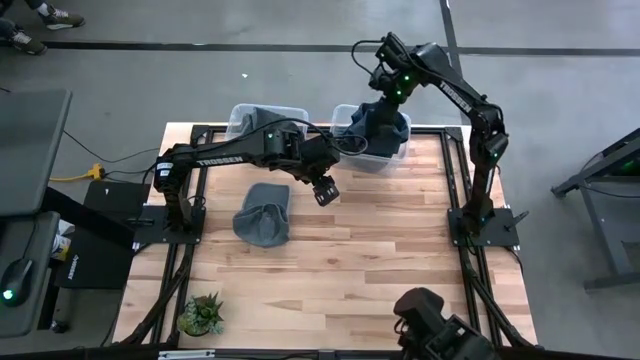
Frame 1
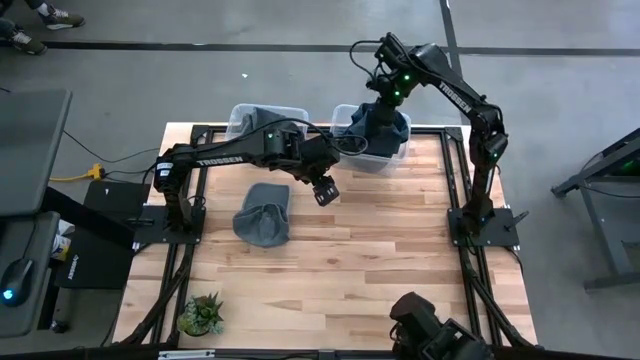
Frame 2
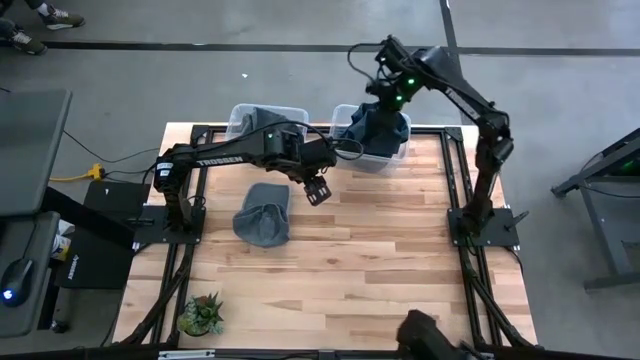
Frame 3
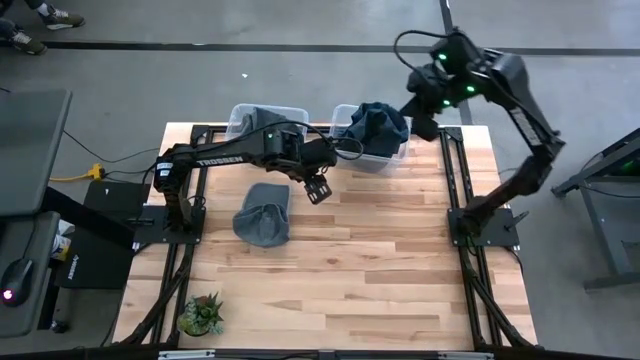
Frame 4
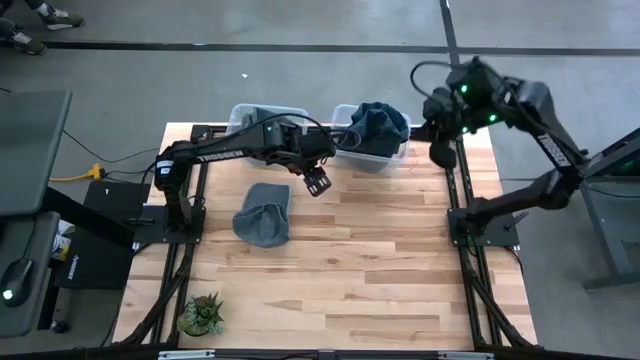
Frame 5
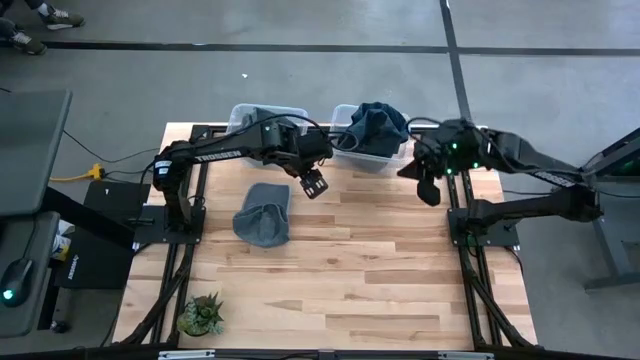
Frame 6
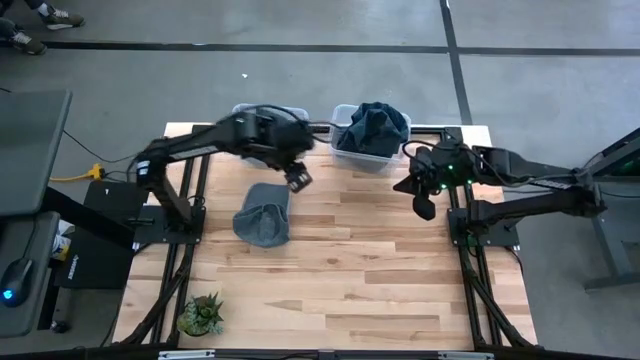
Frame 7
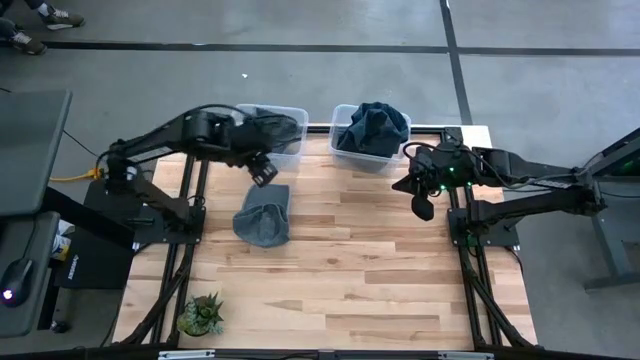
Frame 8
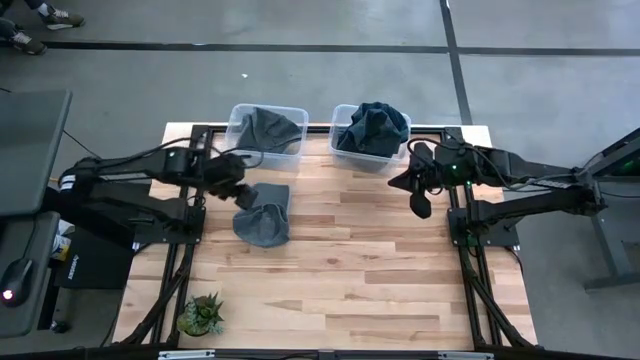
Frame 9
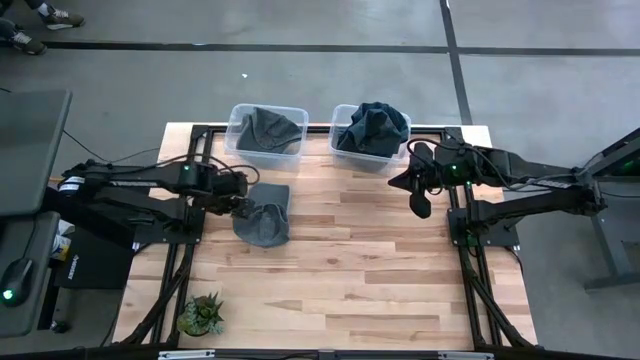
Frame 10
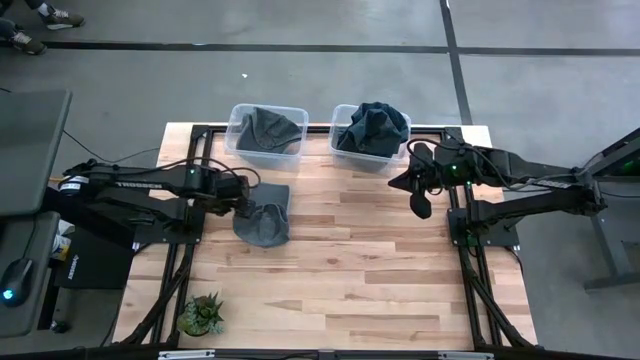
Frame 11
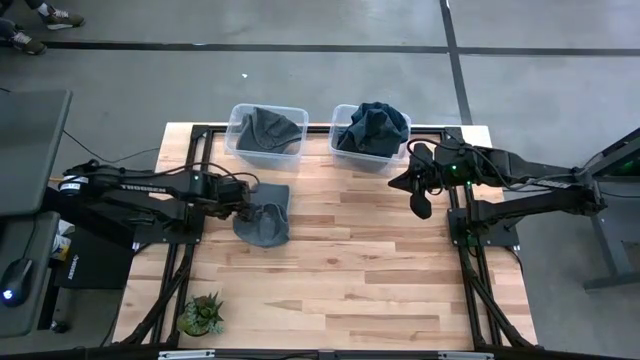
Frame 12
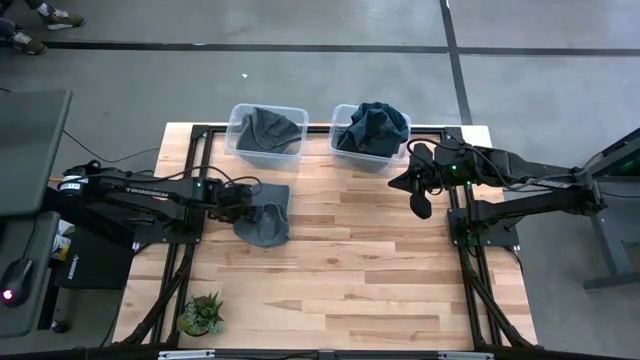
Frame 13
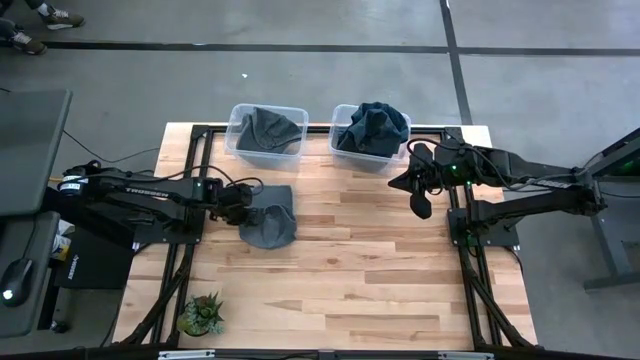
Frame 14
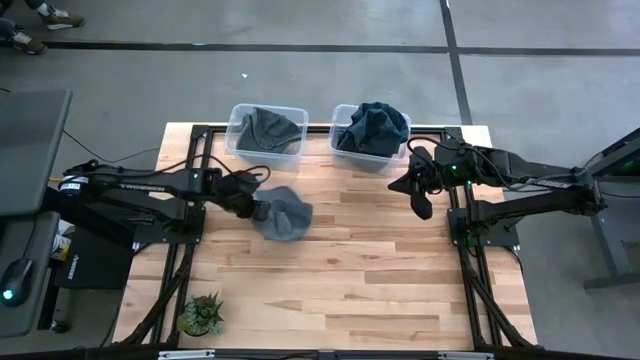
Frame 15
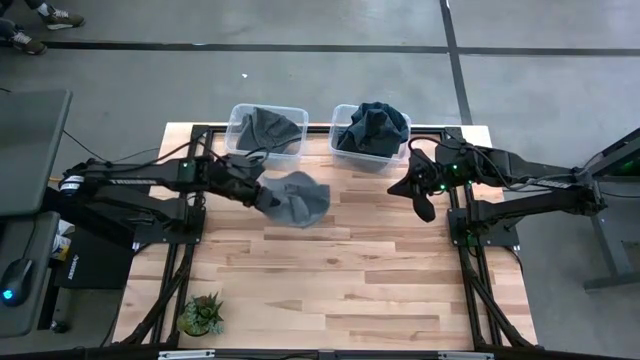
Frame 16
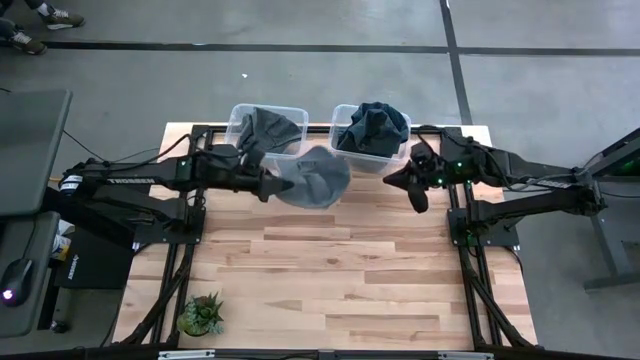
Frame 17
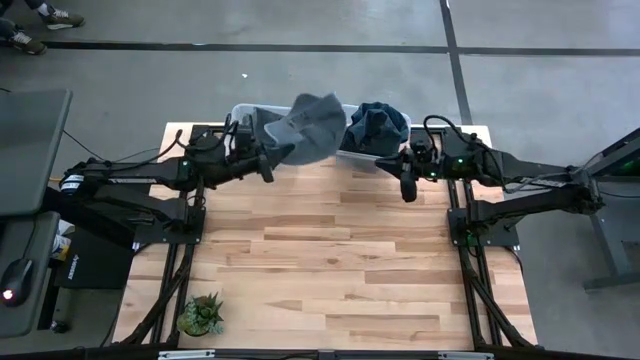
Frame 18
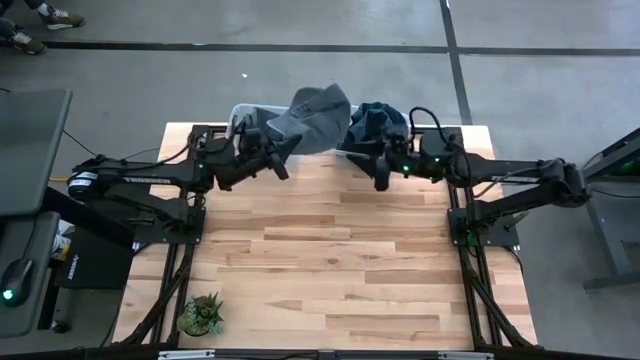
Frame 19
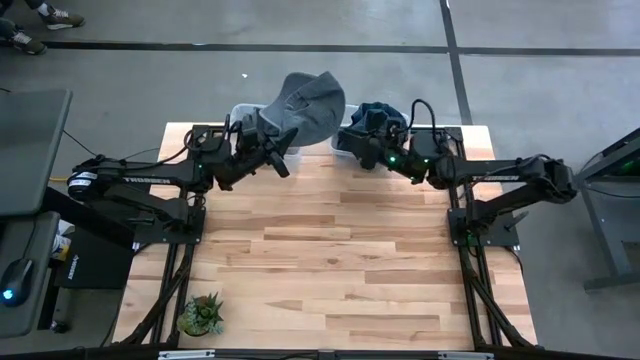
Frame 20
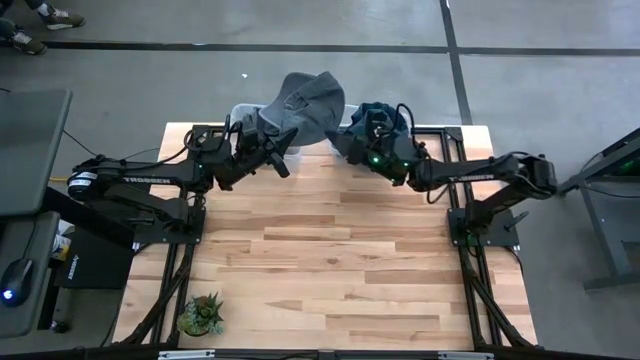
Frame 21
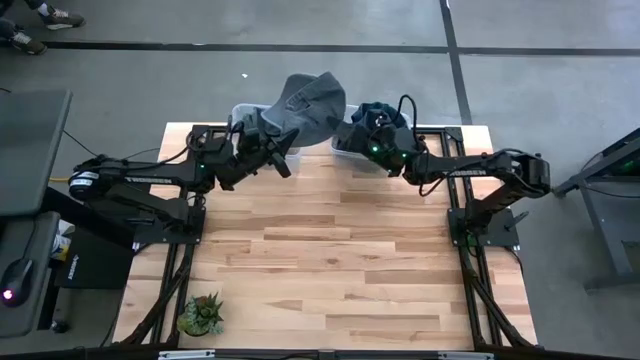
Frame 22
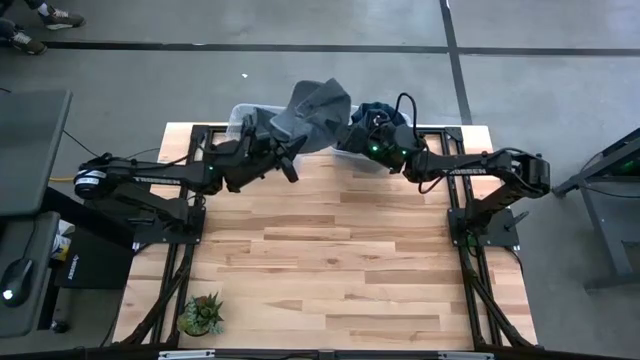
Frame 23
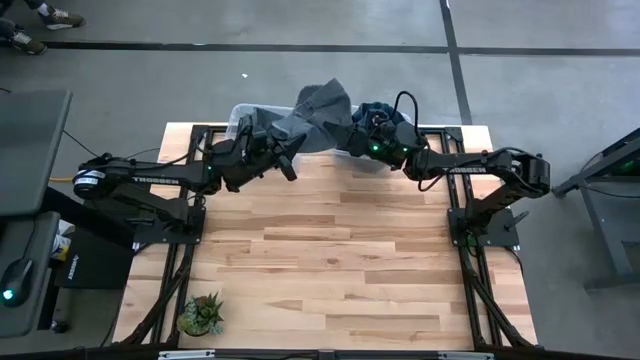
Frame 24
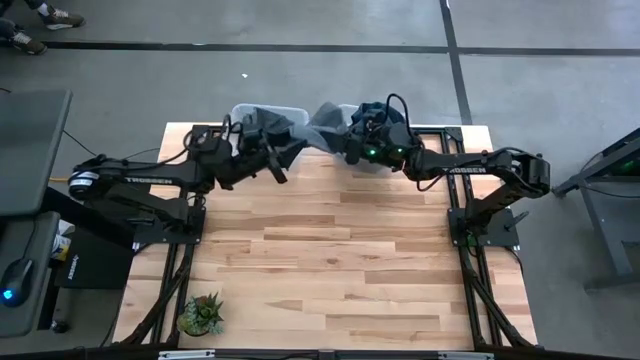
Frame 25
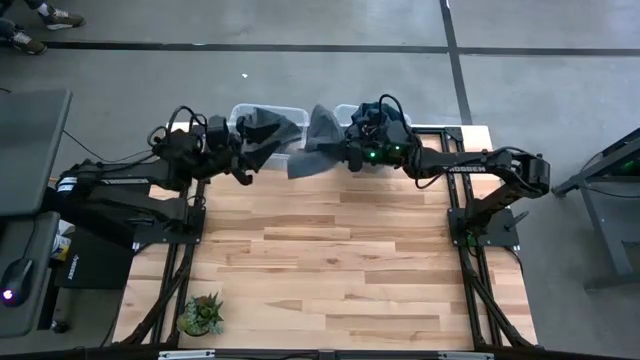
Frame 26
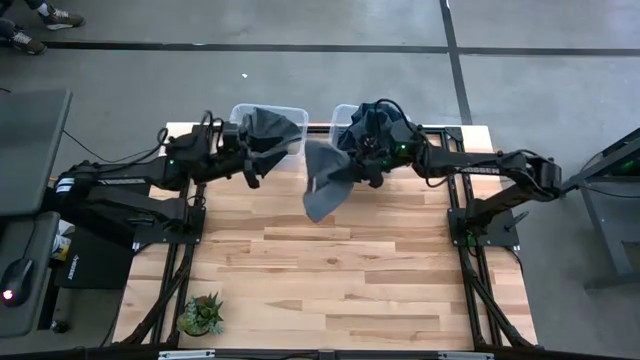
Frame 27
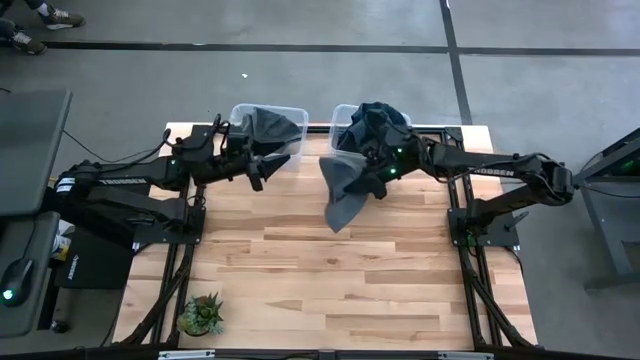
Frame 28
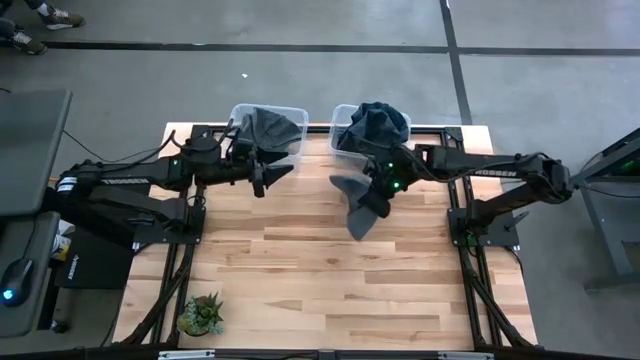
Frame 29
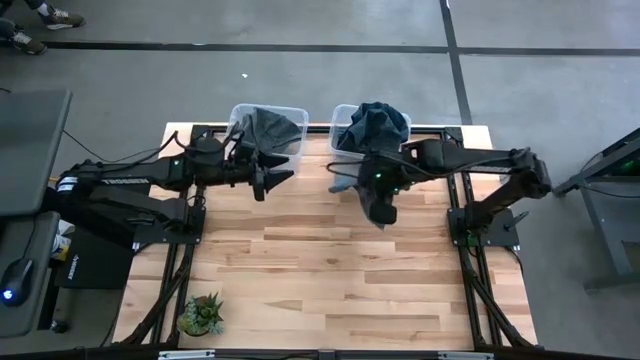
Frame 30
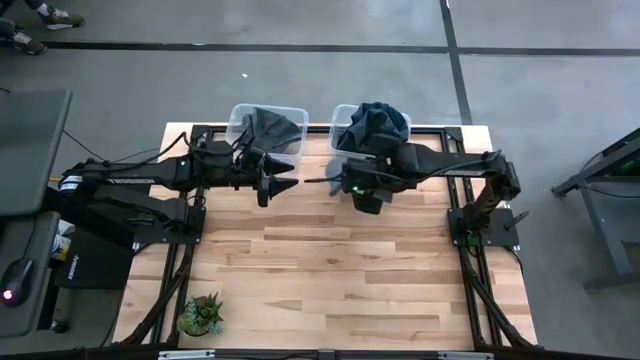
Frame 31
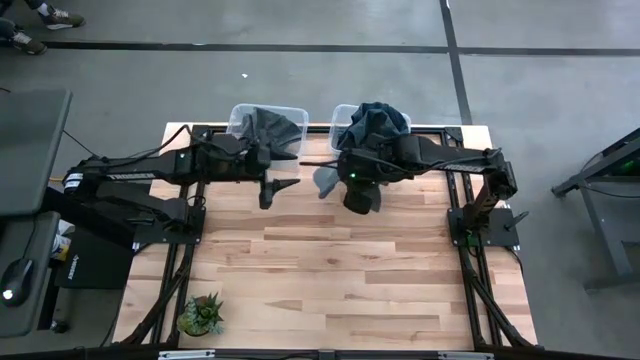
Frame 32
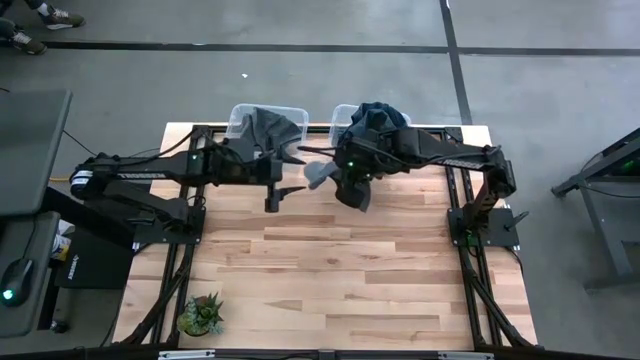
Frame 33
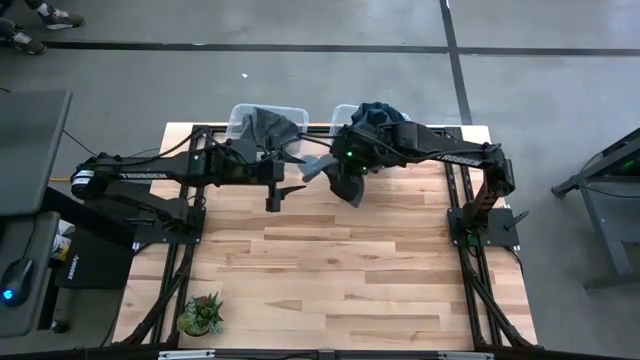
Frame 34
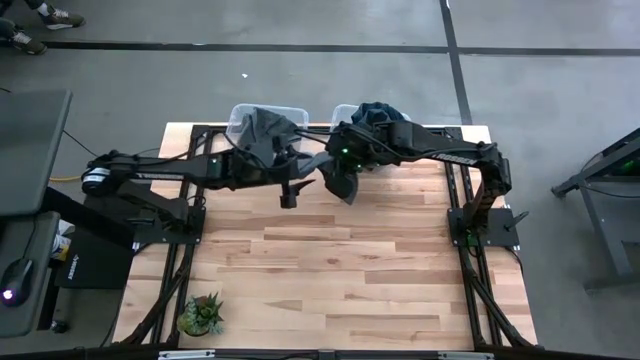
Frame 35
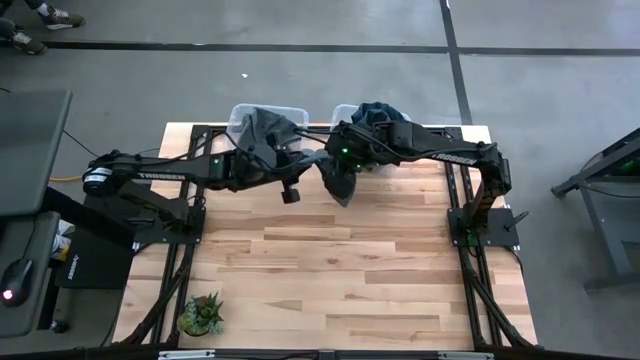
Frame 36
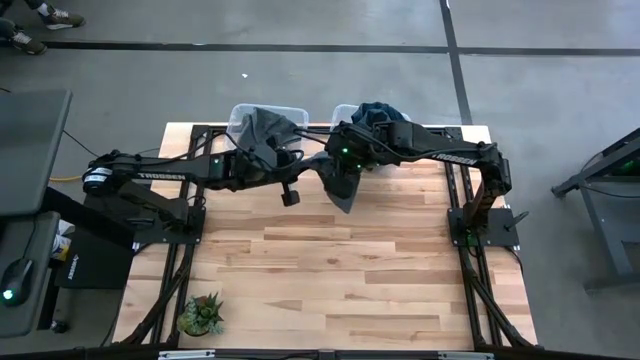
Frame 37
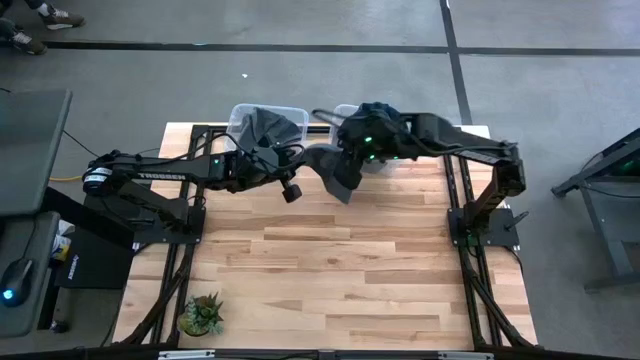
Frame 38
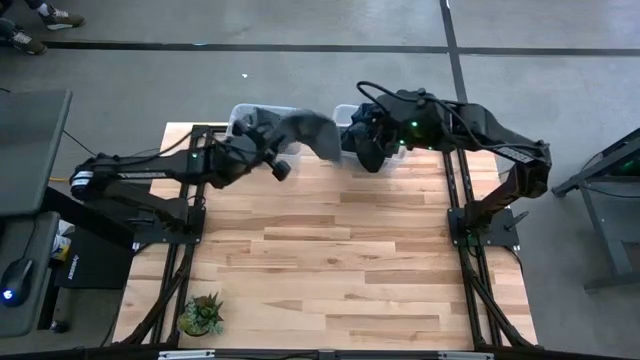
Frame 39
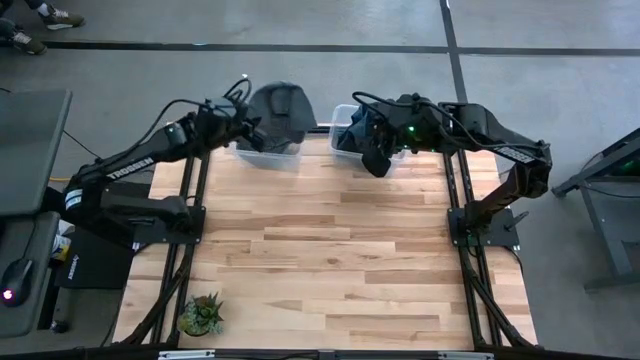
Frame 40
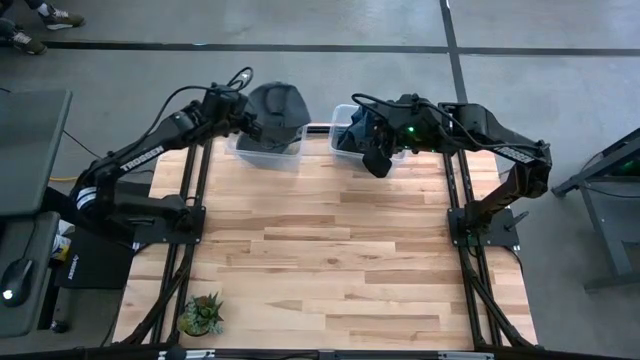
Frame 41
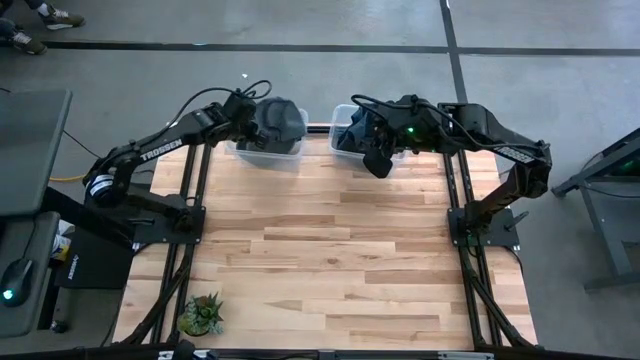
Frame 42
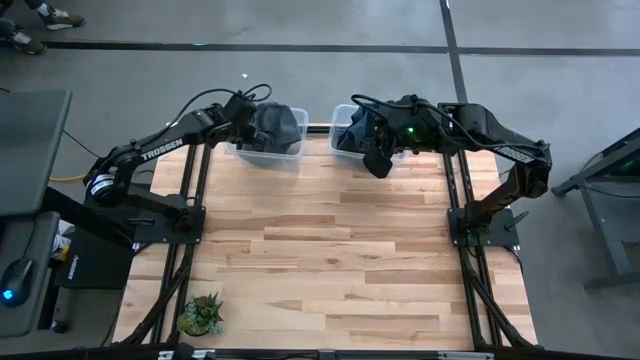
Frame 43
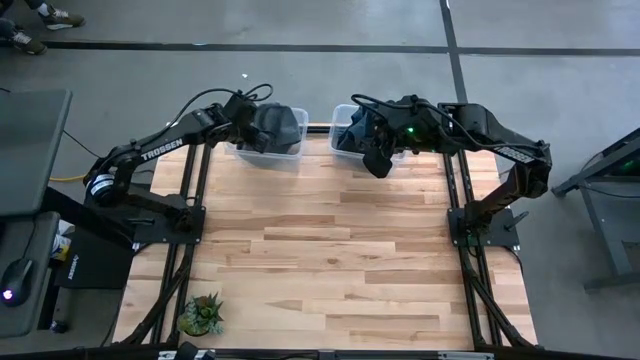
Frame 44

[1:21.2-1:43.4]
Task: Pick & Place hat
Put the gray cap into the left transparent bin
